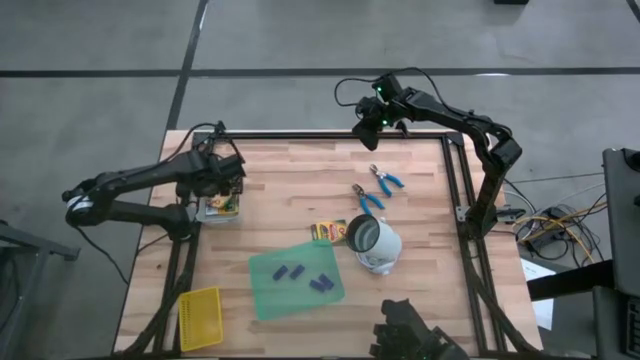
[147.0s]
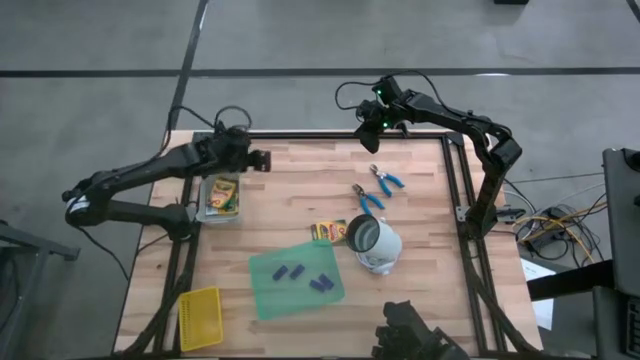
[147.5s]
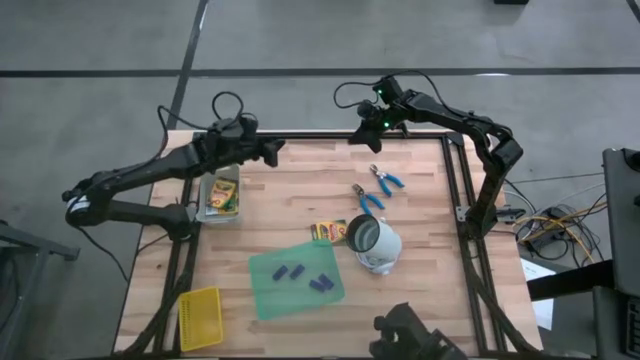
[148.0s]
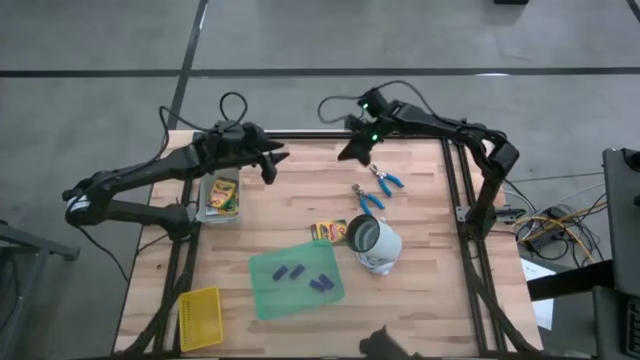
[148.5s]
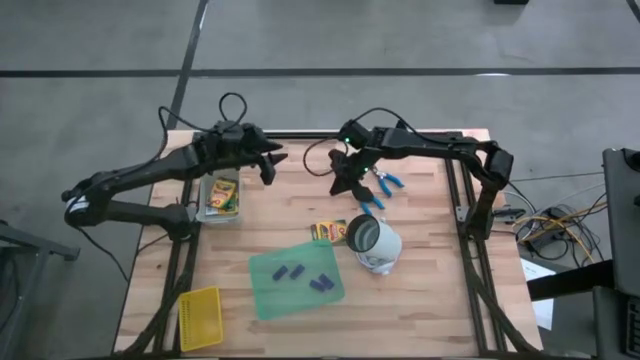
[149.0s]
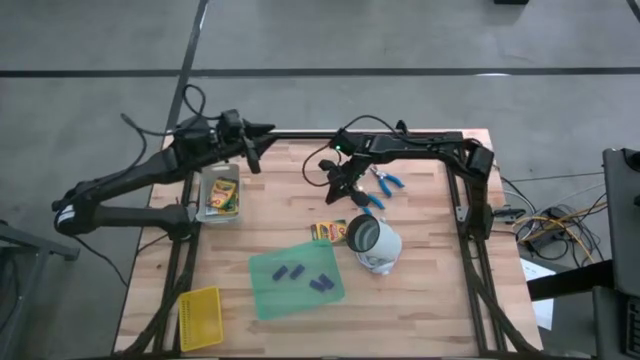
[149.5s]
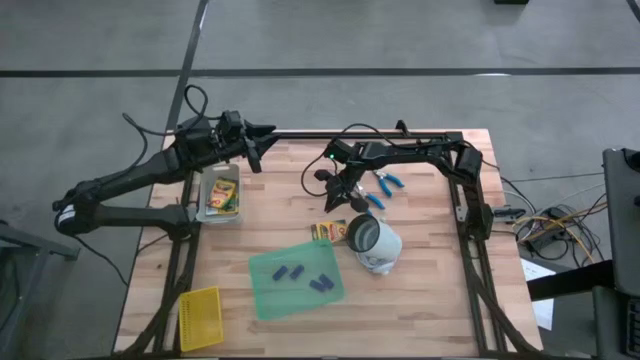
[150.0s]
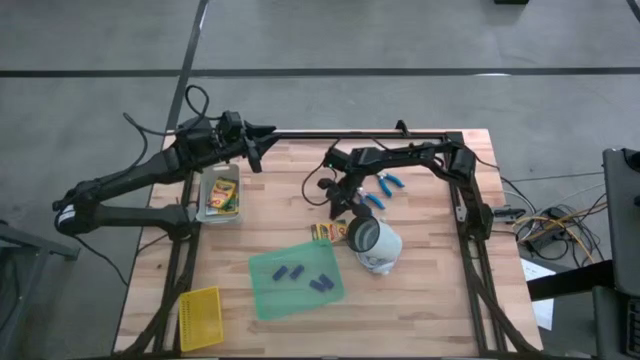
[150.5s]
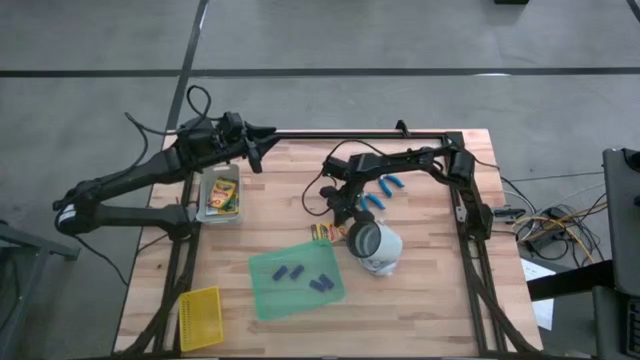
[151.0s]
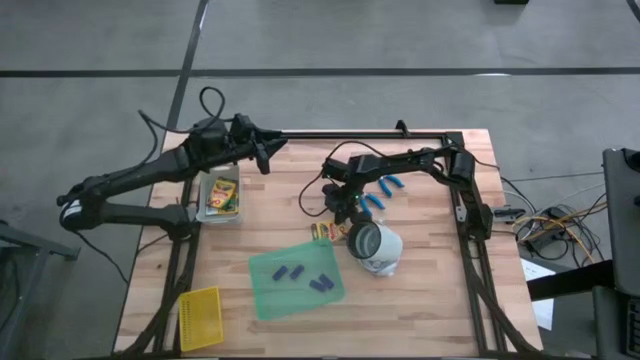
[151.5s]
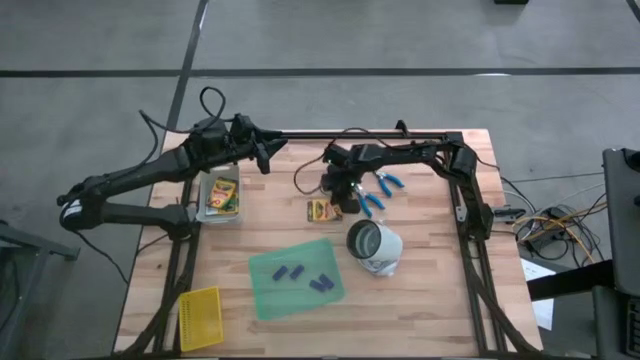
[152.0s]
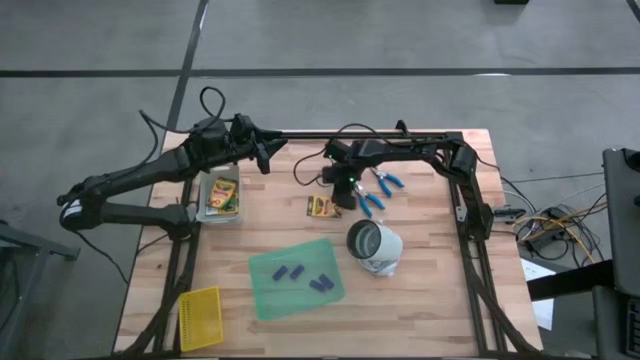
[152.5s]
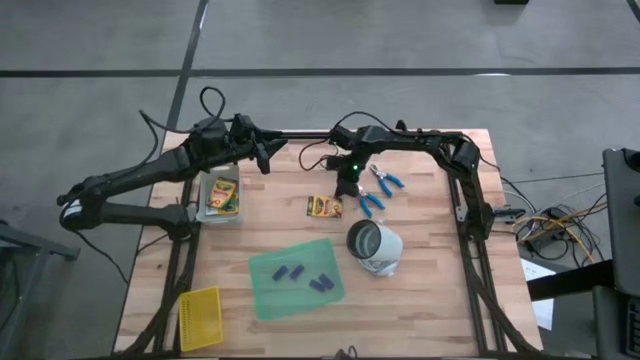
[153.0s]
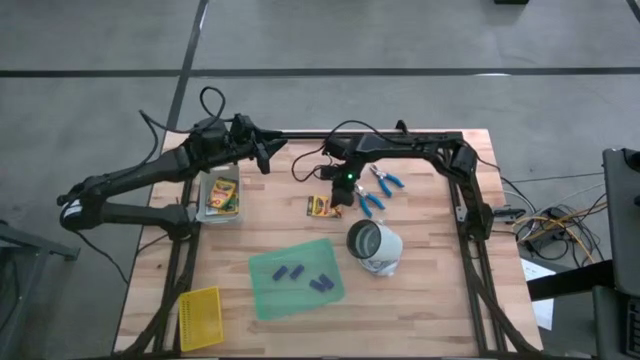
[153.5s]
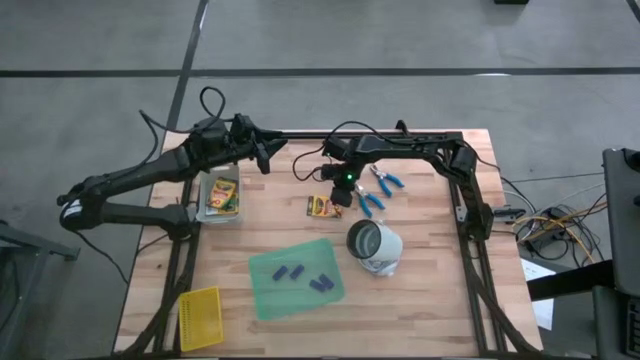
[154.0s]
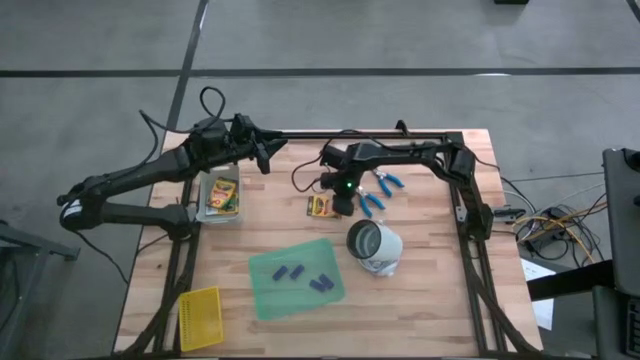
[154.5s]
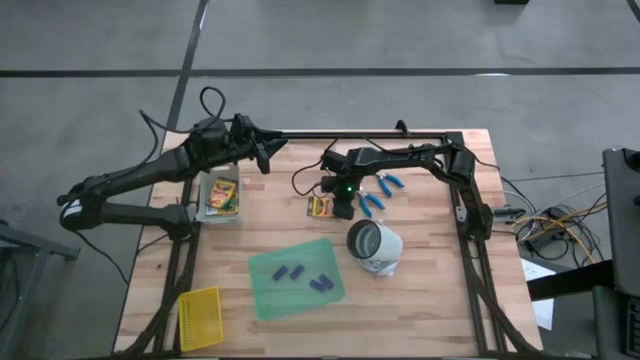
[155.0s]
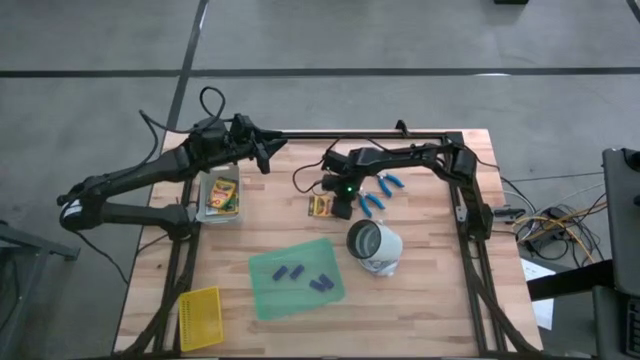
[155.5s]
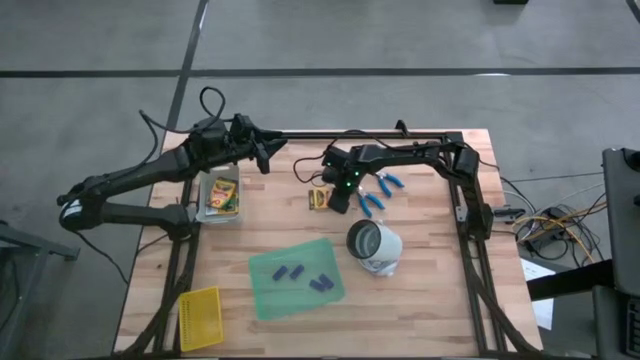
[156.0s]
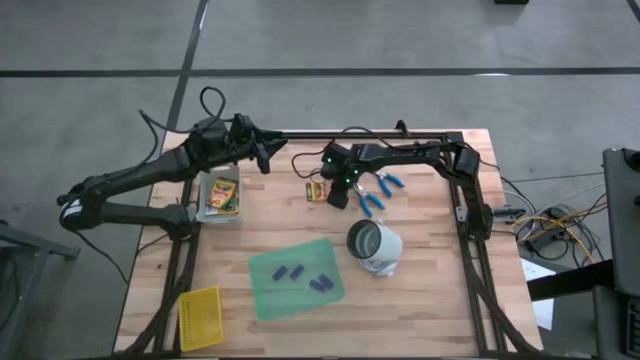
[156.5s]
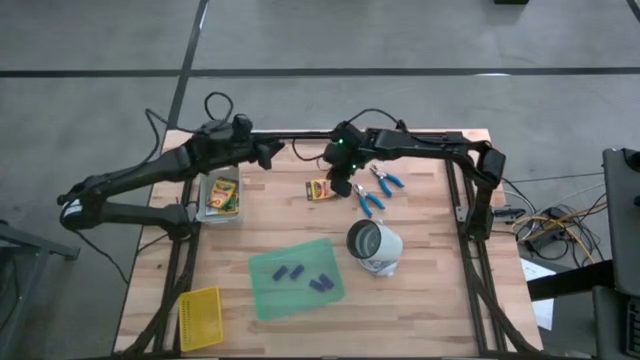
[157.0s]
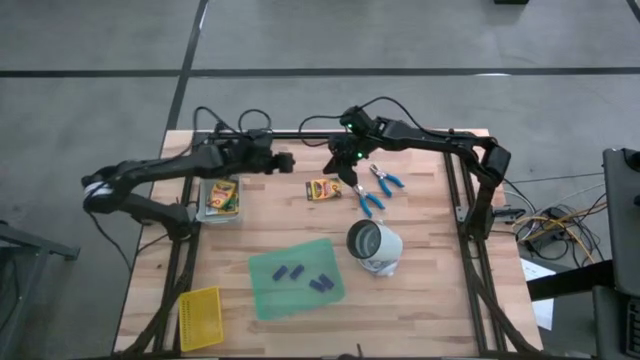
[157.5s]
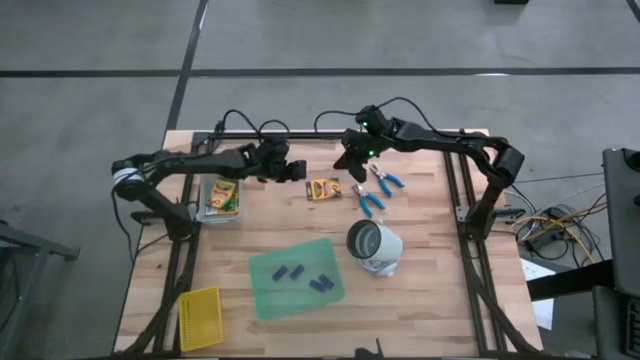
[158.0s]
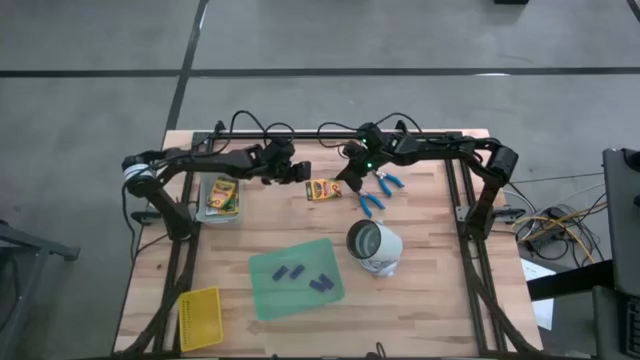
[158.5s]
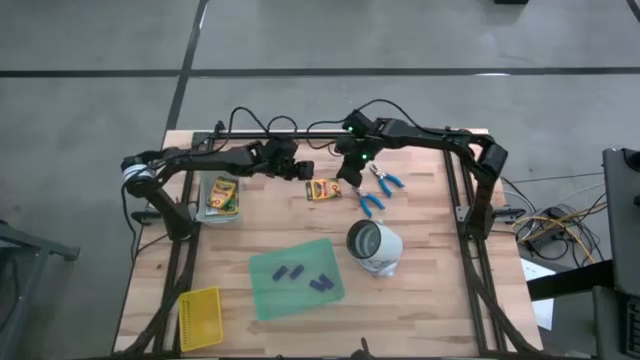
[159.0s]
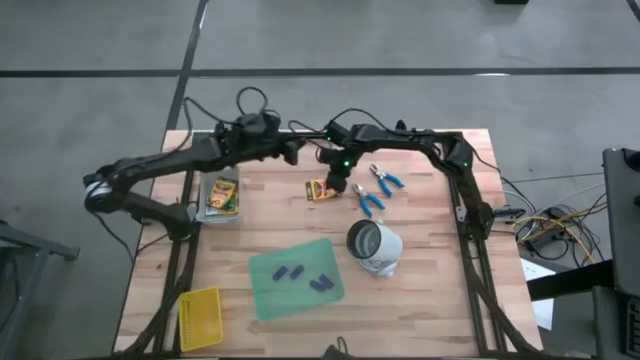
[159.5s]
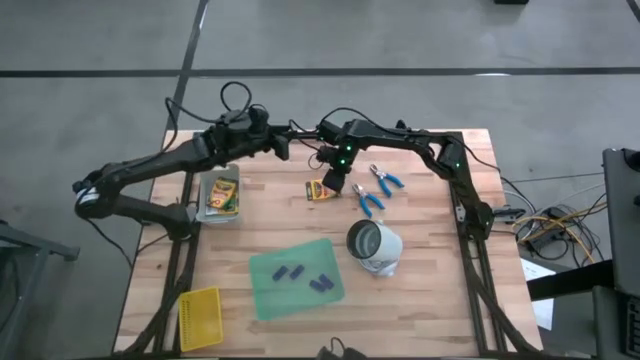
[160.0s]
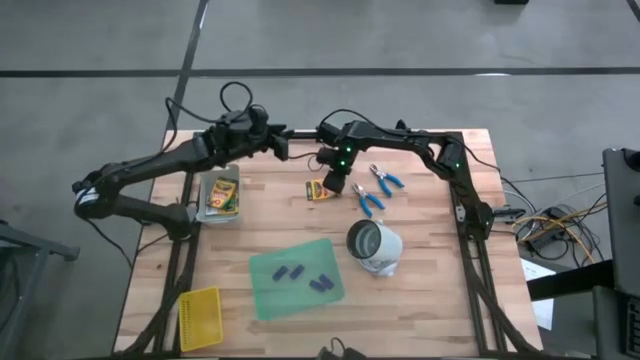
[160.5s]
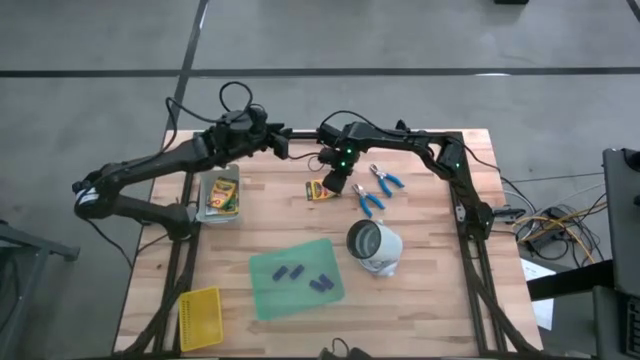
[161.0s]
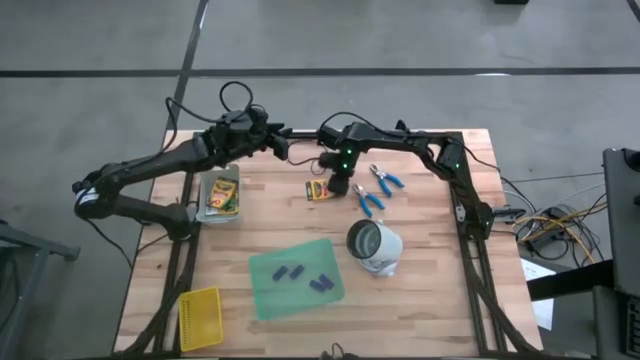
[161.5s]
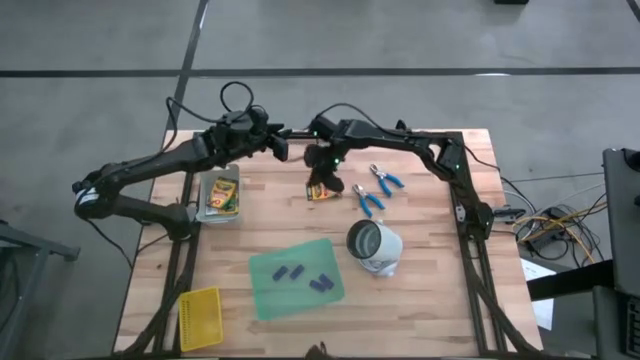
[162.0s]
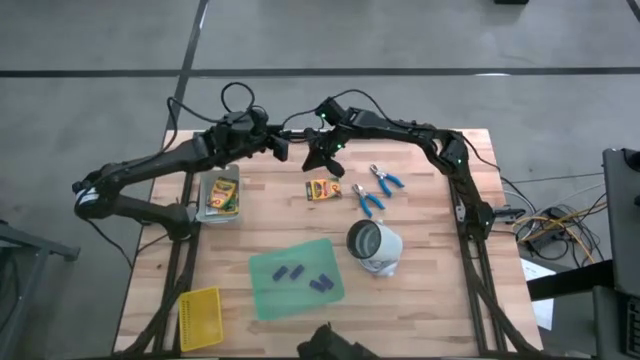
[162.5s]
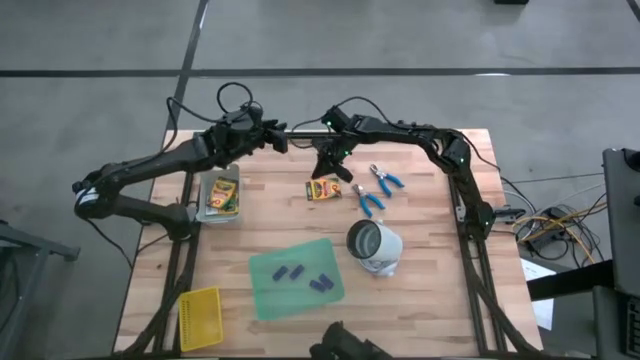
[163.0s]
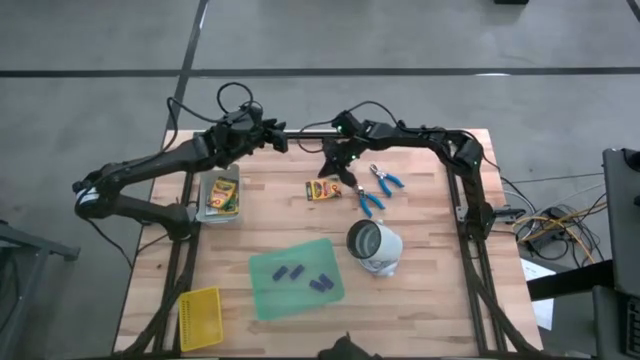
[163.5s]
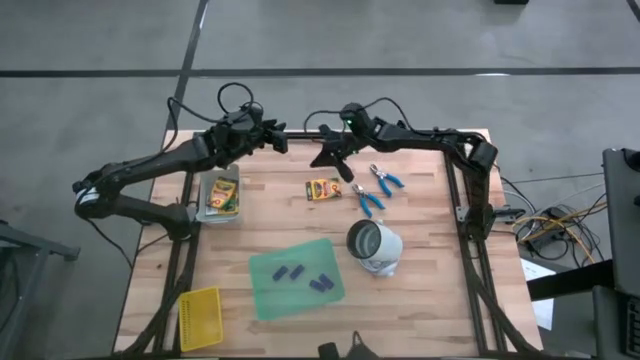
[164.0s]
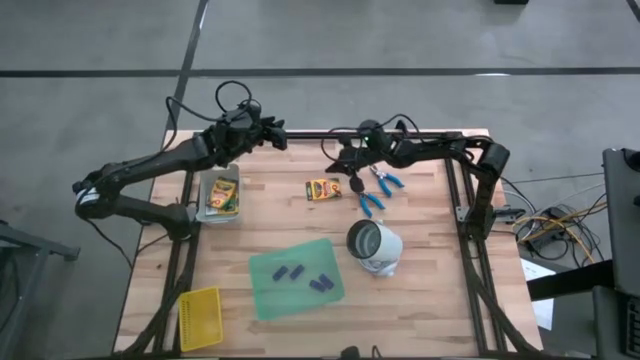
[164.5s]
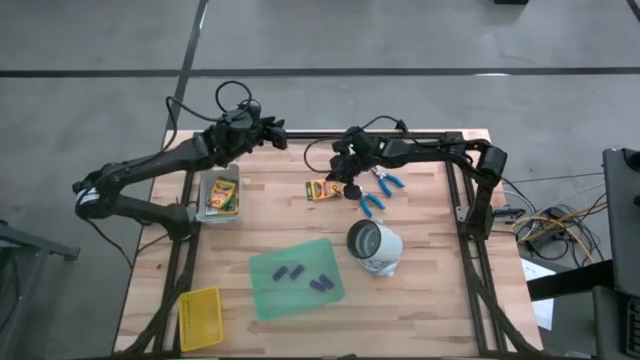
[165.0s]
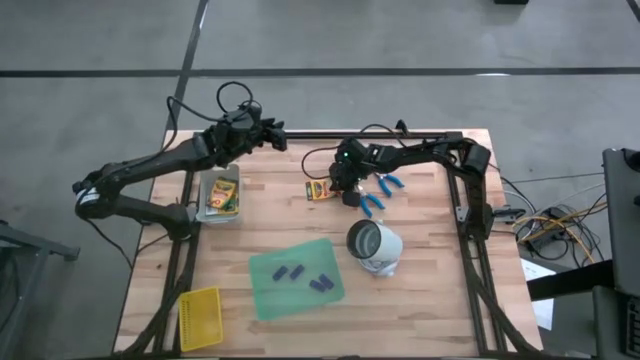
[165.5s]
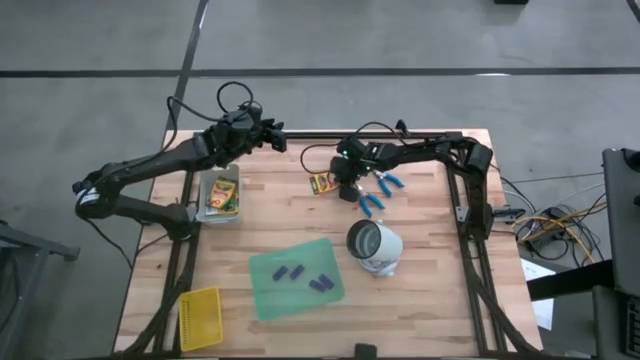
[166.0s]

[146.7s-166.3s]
Task: Pick & Place School Supplies
Put the yellow crayon box into the gray bin

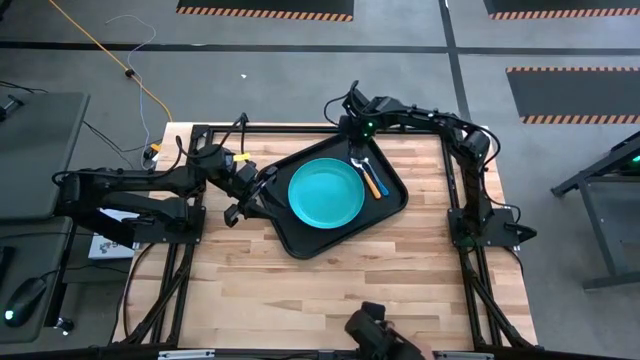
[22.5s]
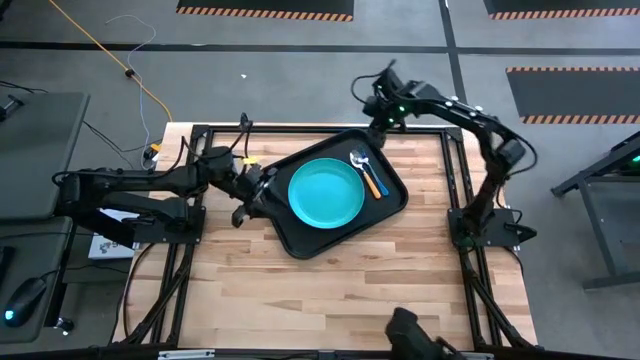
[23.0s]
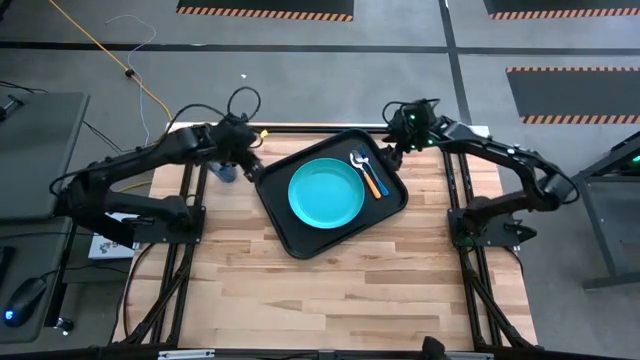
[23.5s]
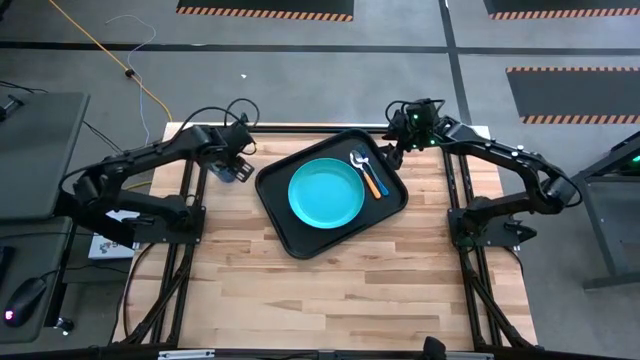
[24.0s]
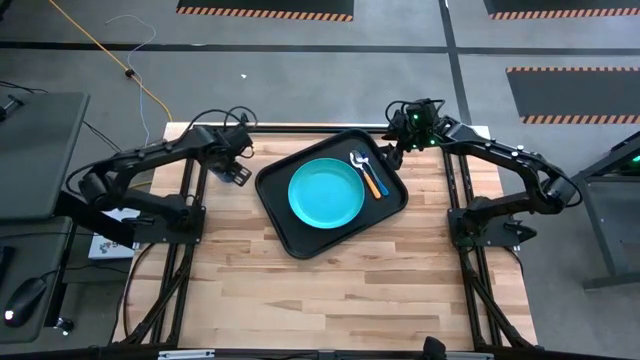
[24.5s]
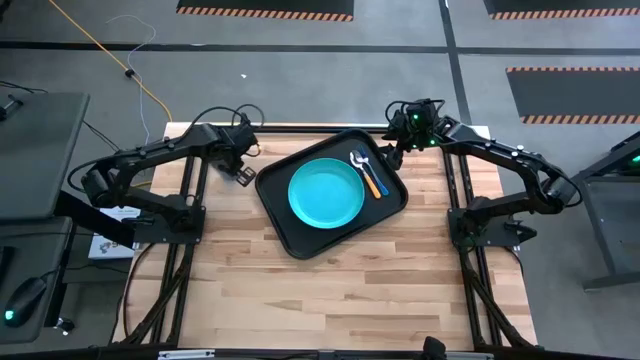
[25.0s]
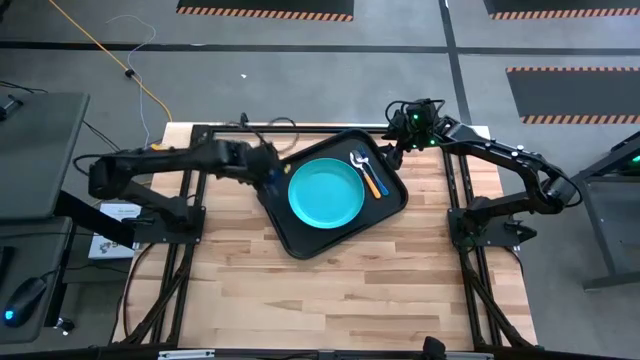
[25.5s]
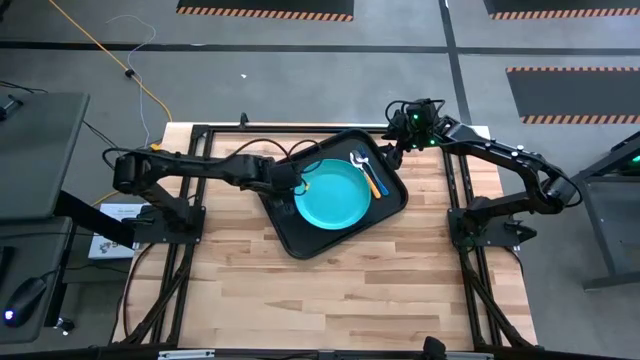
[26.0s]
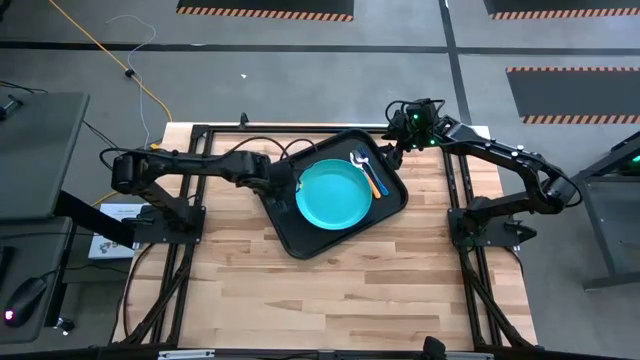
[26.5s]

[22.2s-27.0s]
Task: Pick and place plate/cup/fork/spoon on tray
Put the blue cup on the top left of the light blue plate
